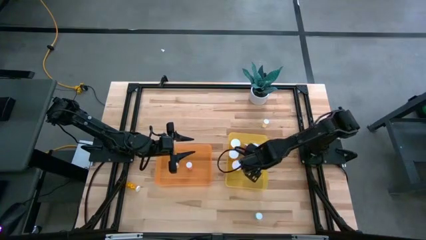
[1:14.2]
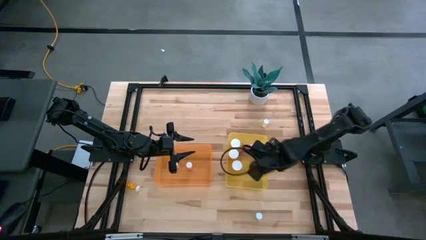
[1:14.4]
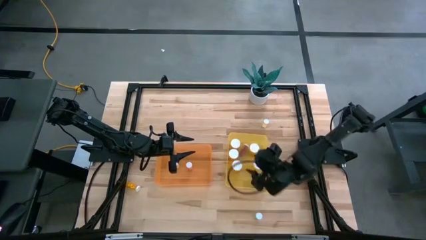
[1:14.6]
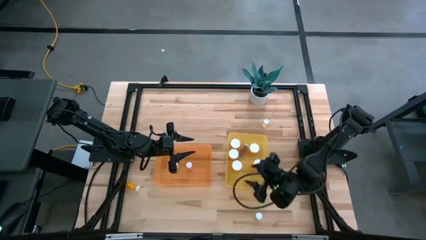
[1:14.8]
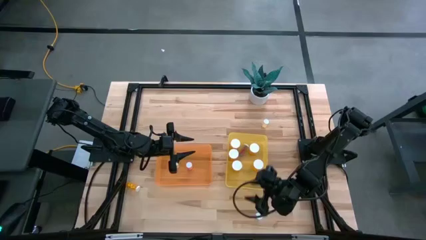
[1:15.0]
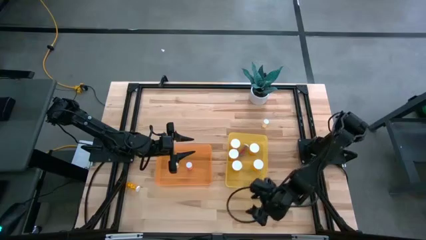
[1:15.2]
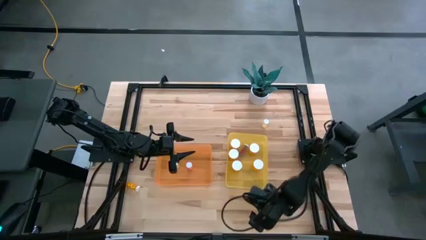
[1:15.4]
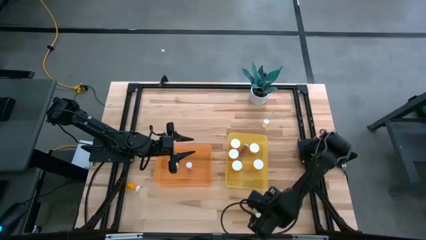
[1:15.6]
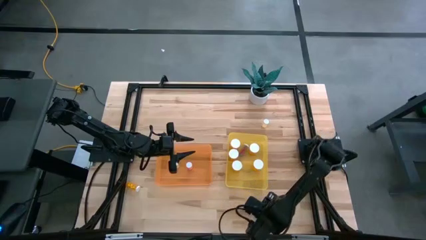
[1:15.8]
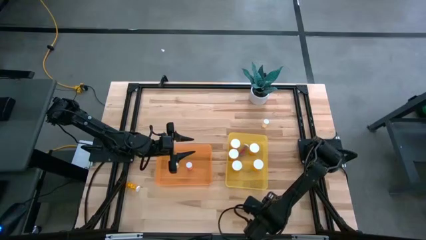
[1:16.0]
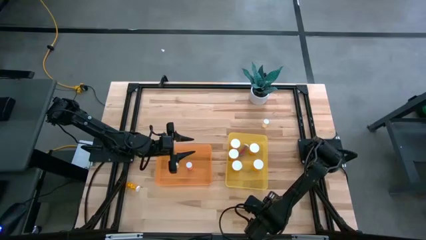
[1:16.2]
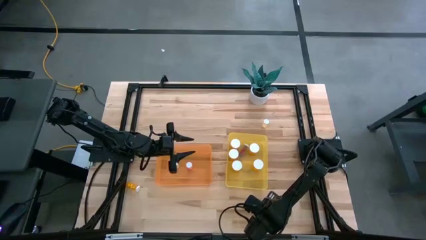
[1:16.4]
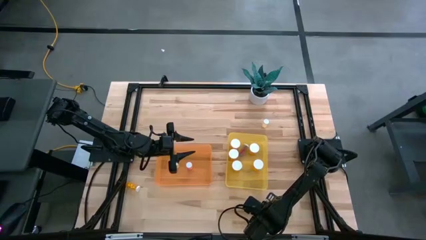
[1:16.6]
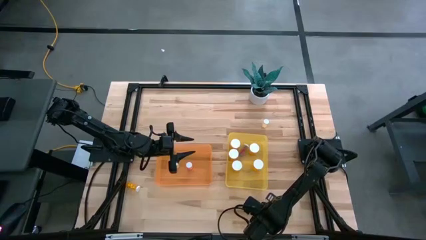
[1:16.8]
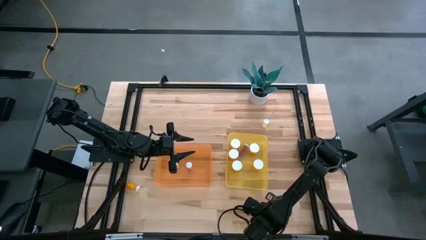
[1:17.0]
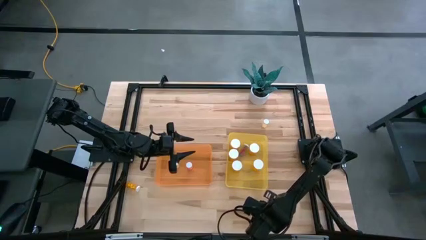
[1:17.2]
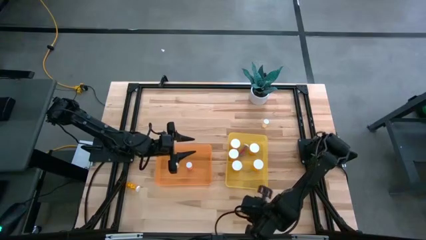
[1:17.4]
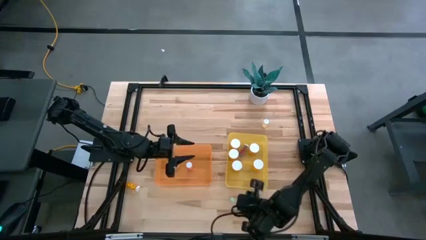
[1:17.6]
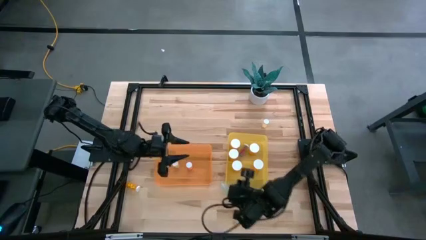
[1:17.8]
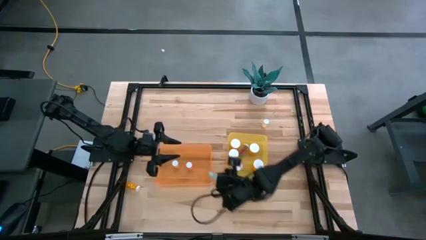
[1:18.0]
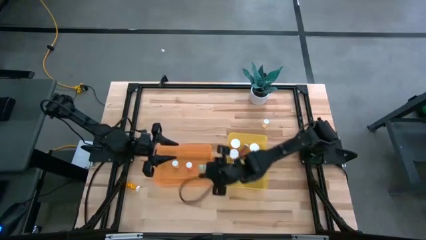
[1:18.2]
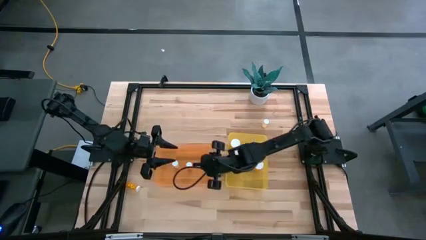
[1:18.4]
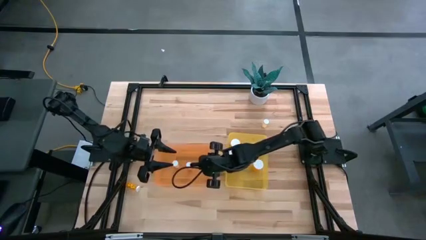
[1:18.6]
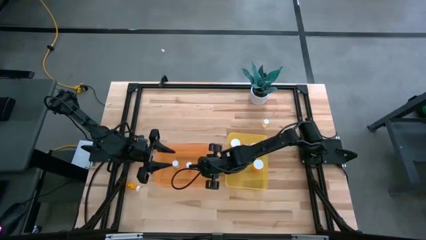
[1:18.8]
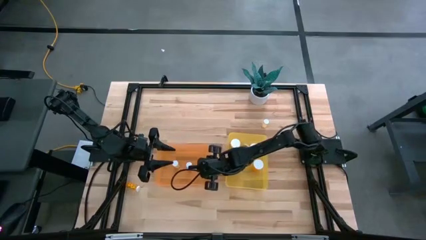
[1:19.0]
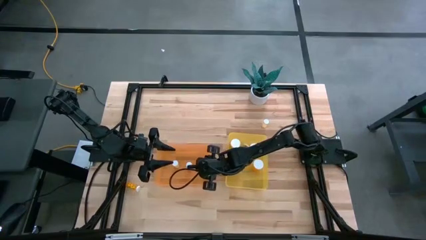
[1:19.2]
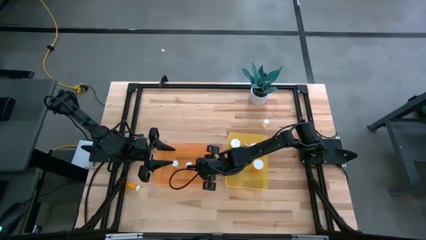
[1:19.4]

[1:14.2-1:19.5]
Task: Pick and place medicine bottles into bin by pill shape (circle, oval)
Put the blue tablet bottle into the orange bin

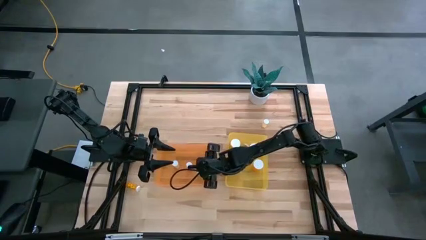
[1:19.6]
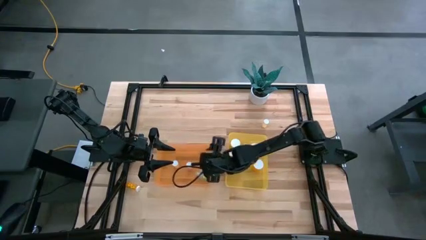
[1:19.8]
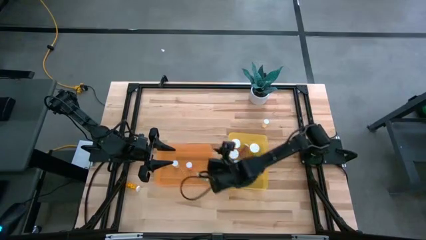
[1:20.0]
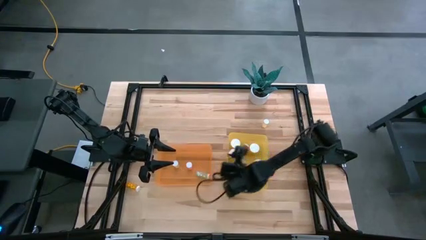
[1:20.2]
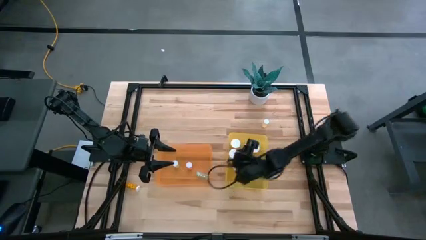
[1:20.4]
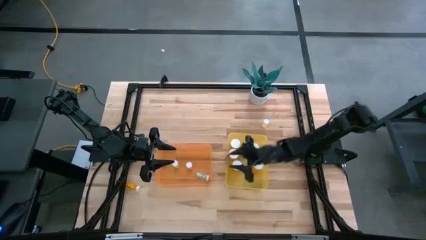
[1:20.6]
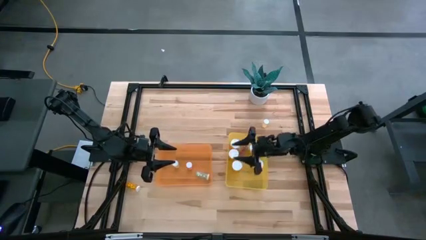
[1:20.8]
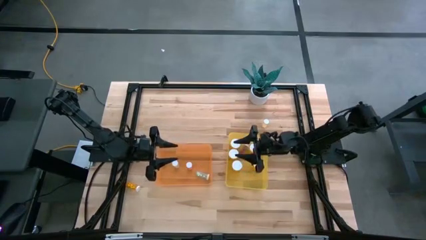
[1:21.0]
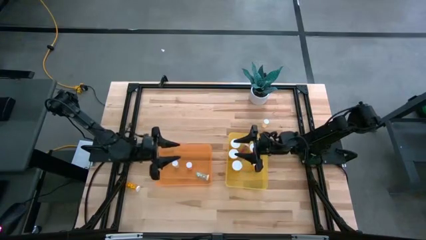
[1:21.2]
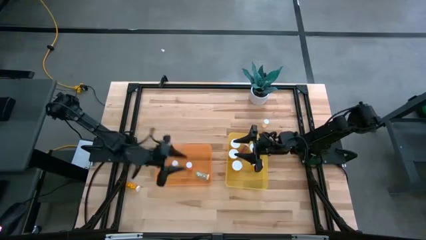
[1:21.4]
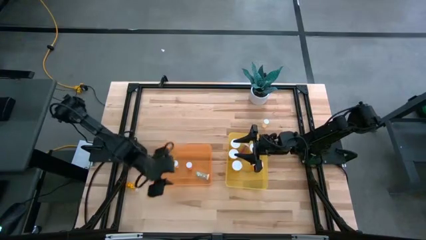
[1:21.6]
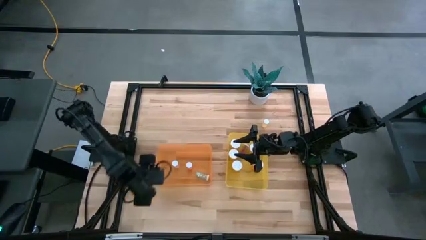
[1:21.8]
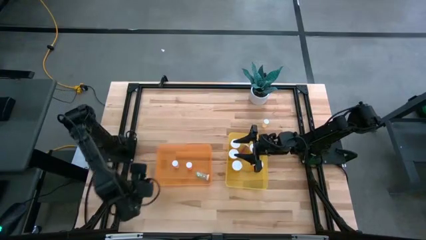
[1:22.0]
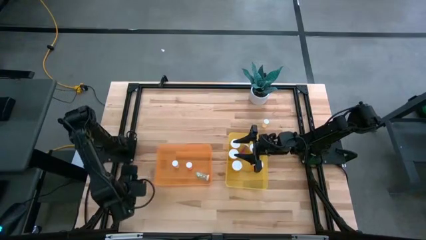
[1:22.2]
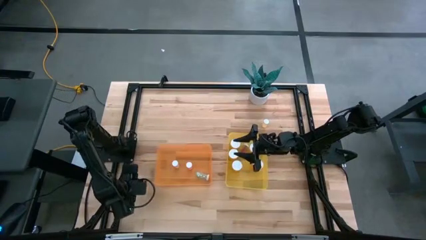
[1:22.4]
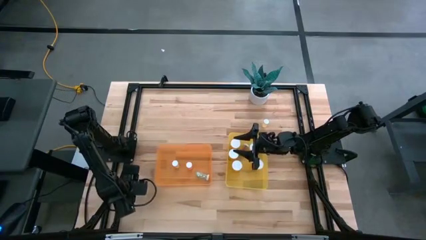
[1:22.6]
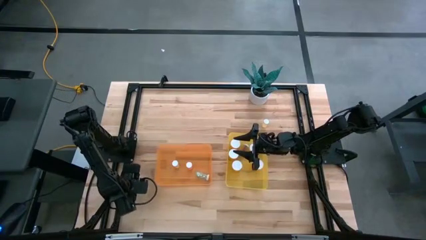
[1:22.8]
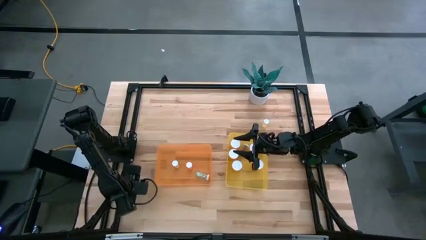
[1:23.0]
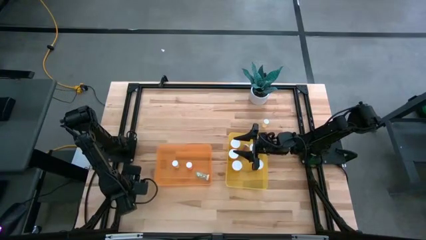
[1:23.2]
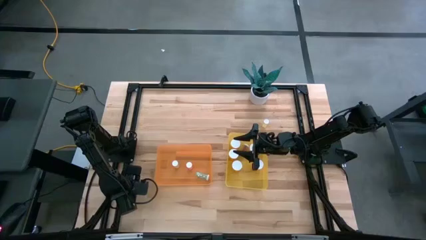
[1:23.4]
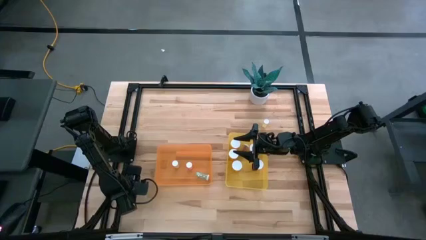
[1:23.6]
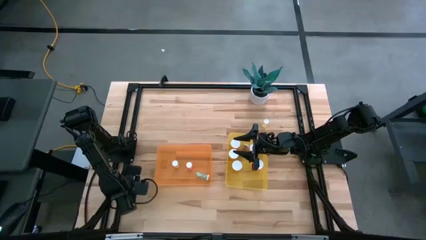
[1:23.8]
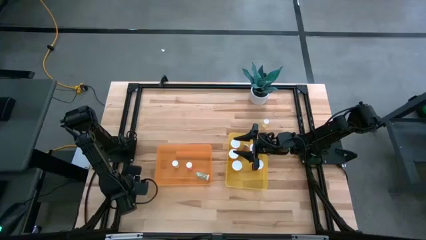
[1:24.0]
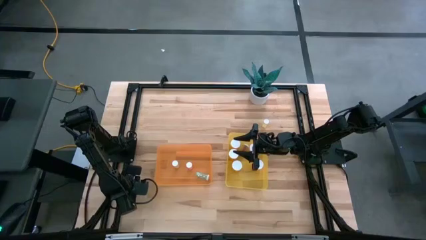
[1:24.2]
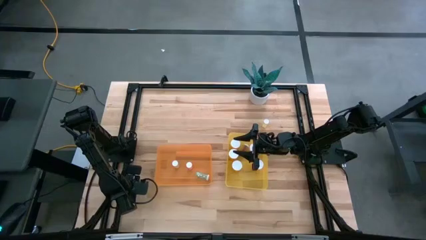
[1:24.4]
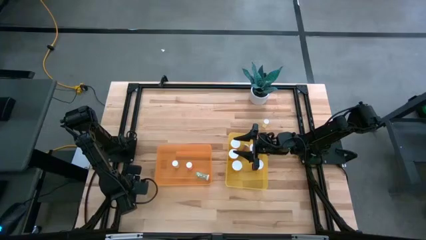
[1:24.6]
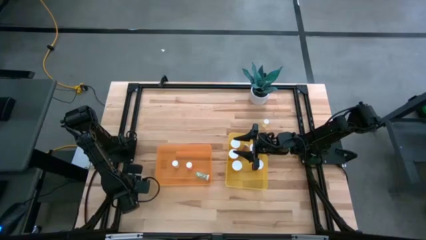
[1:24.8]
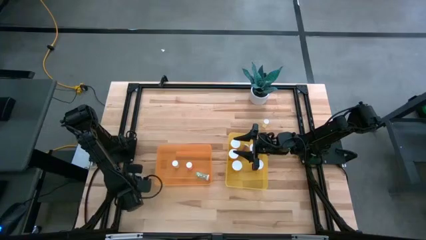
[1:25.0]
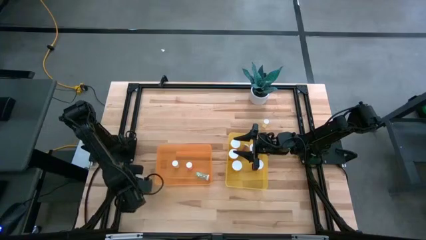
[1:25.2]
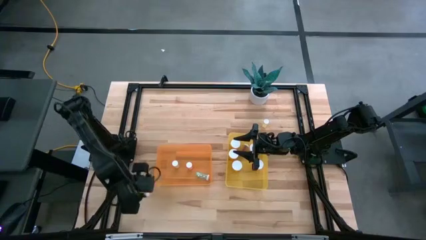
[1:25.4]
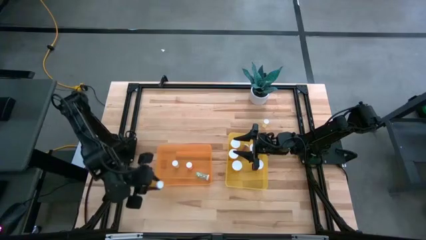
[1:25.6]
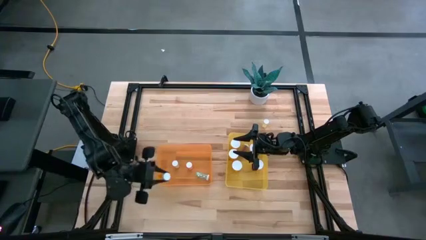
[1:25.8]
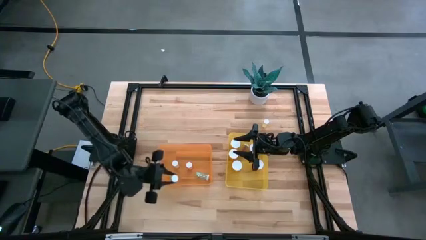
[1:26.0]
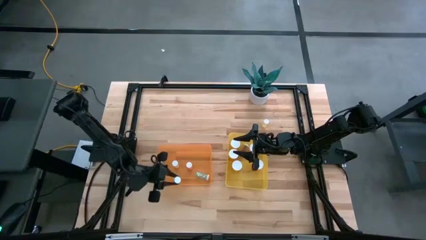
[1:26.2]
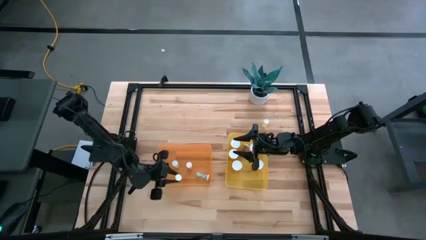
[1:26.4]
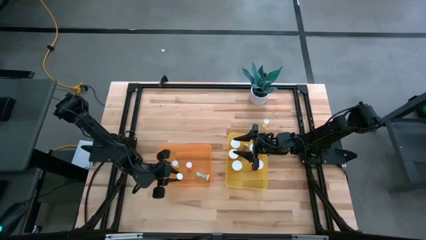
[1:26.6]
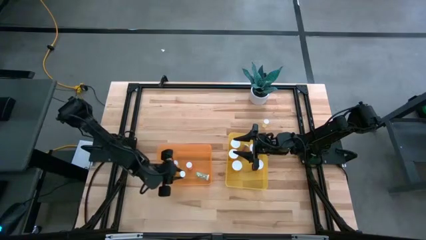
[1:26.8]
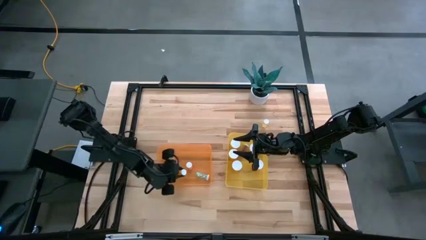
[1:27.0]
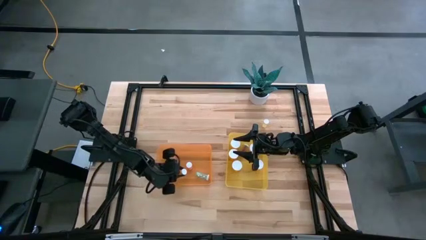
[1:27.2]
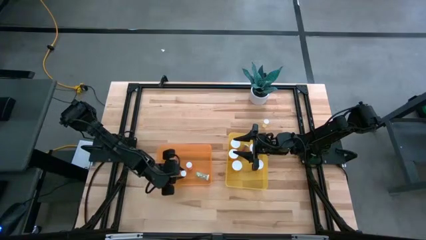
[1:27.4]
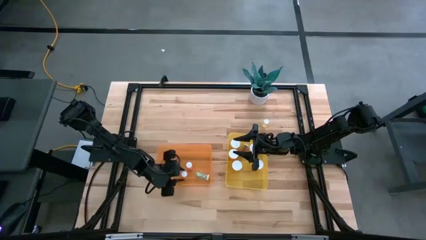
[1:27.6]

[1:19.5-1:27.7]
Put the orange tablet bottle into the orange bin

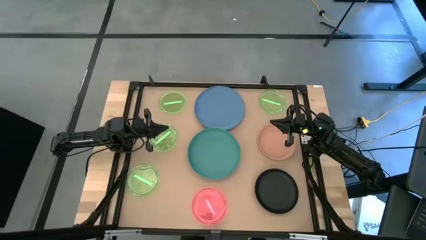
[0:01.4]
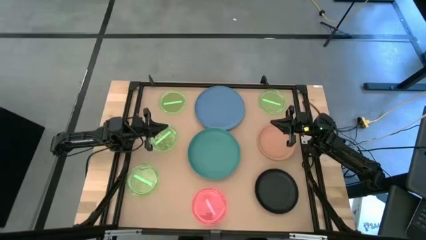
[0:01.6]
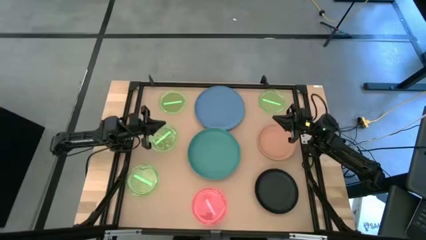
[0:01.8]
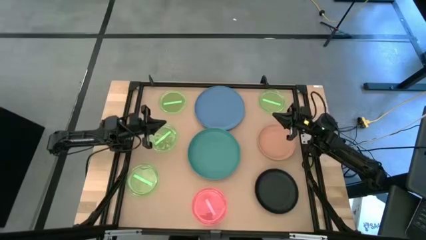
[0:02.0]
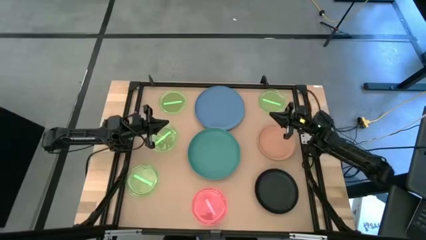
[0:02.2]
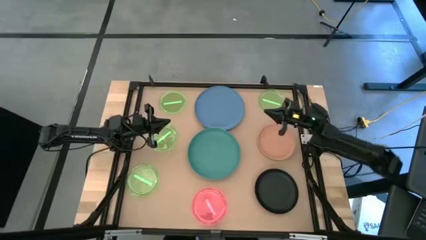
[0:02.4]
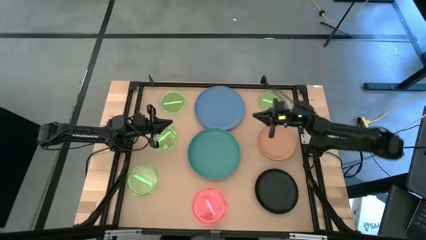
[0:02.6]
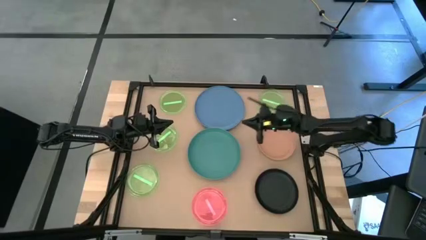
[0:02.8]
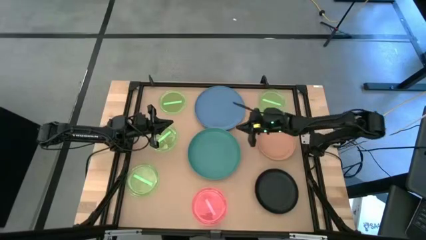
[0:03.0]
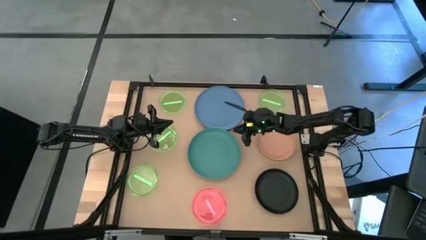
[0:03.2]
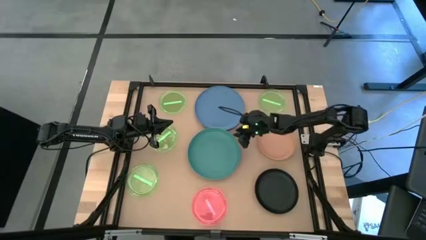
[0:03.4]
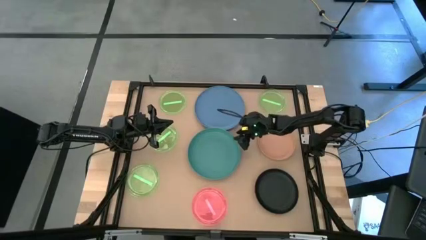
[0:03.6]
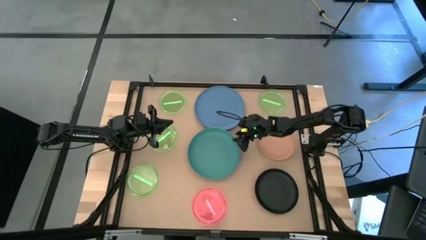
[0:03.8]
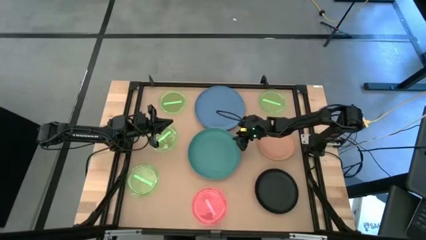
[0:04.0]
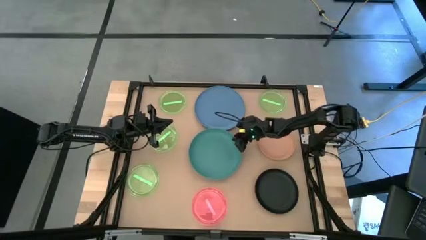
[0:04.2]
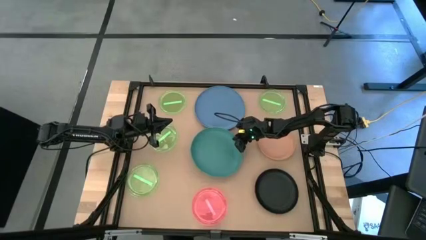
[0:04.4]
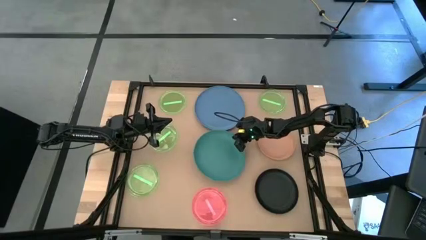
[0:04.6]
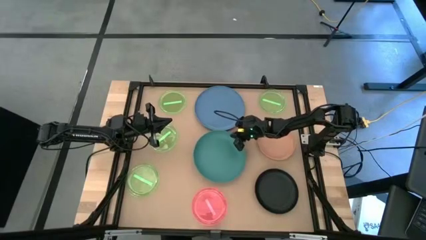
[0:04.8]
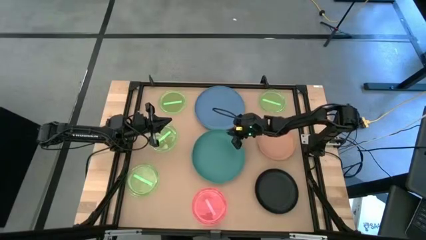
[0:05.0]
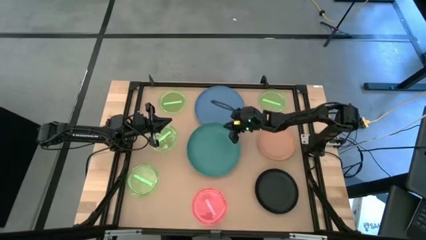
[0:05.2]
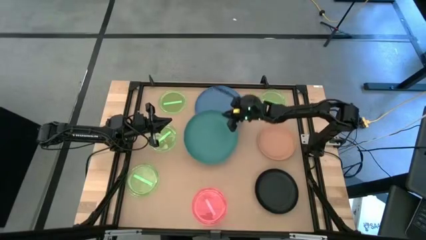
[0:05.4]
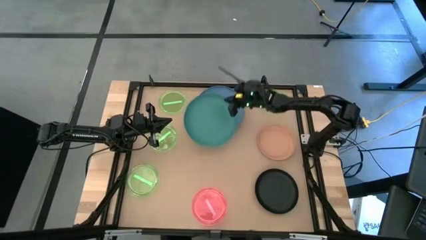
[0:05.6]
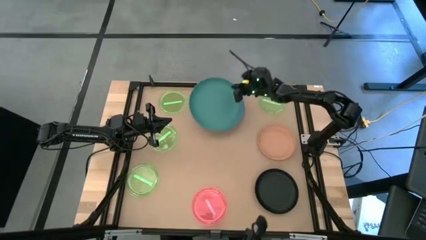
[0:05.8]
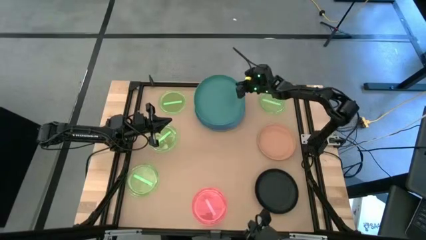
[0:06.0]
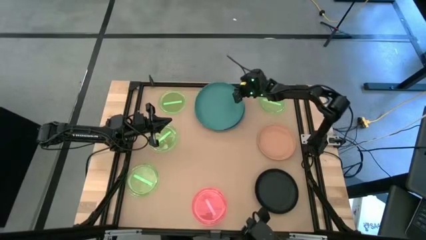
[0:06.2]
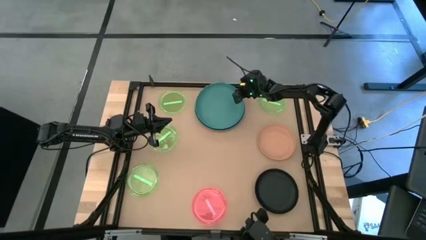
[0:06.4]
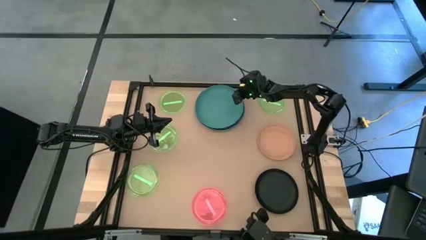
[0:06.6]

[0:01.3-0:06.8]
Task: Stack plastic plates
Stack the green plate on top of the blue plate
